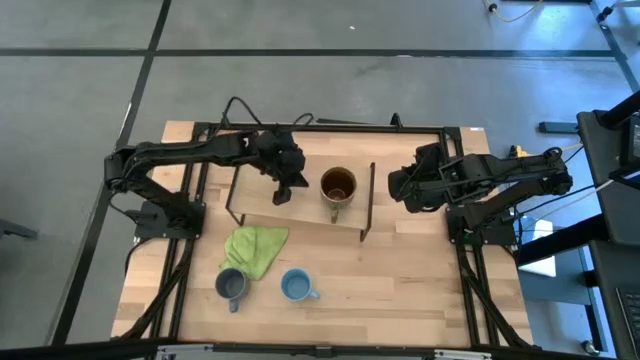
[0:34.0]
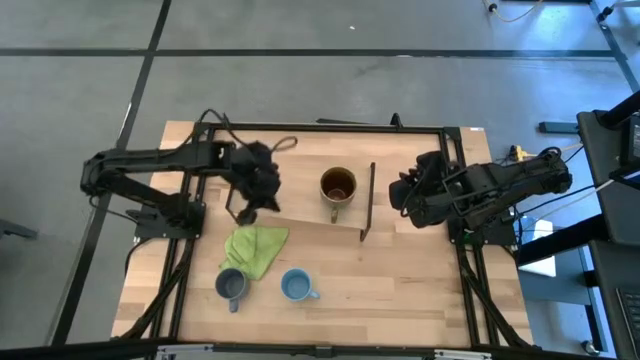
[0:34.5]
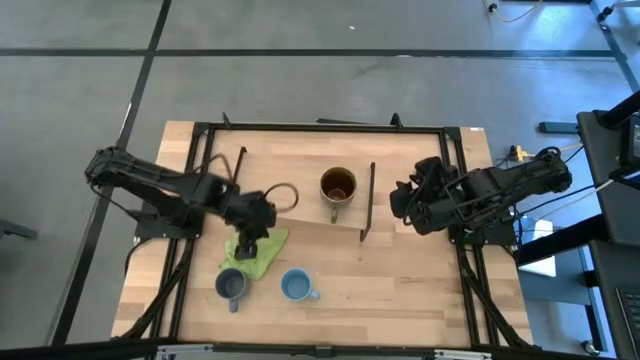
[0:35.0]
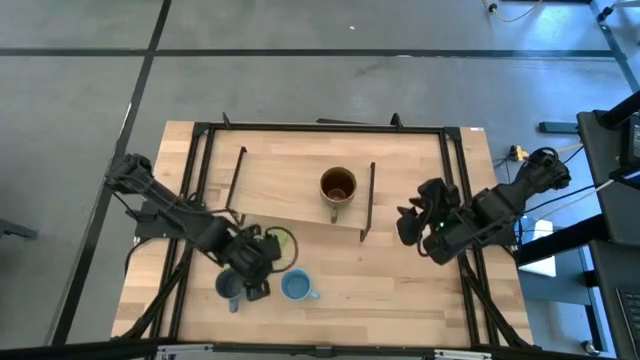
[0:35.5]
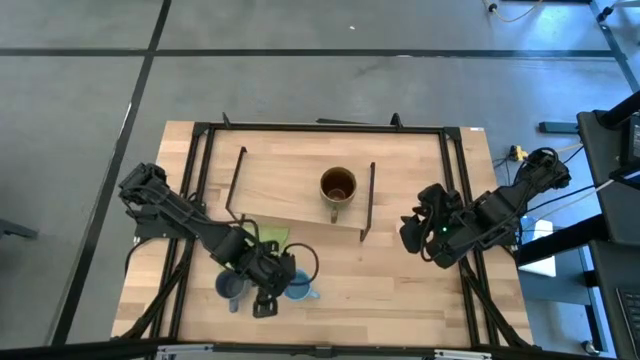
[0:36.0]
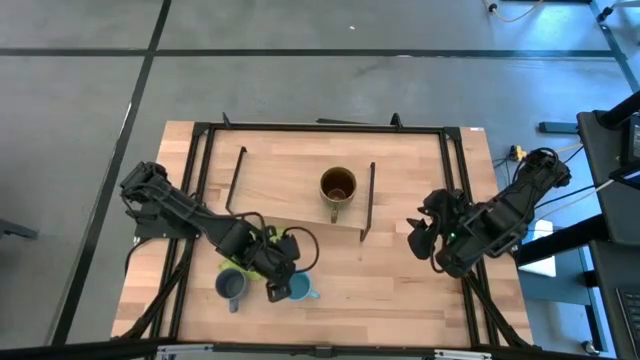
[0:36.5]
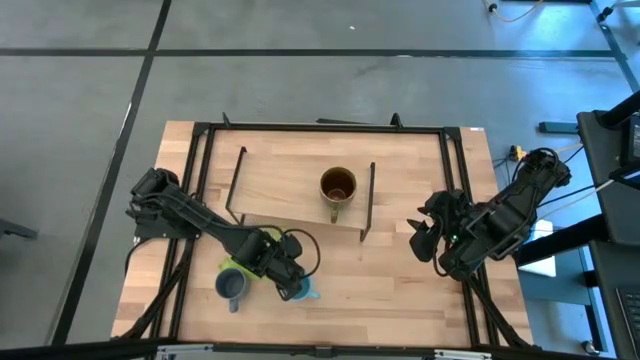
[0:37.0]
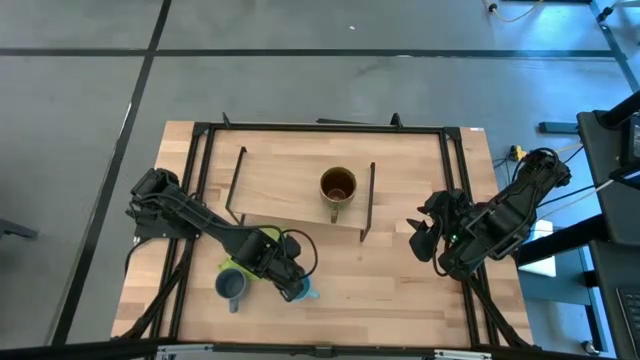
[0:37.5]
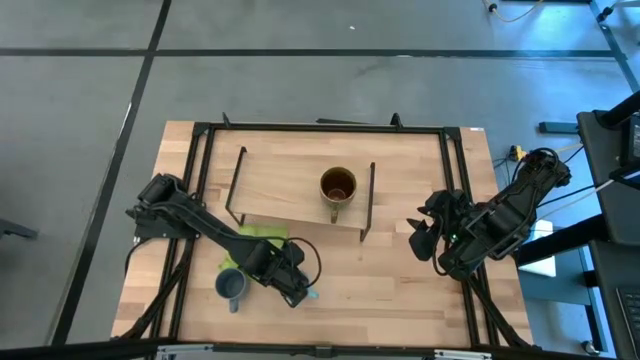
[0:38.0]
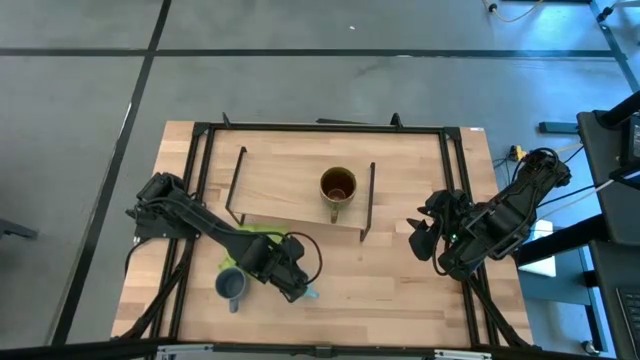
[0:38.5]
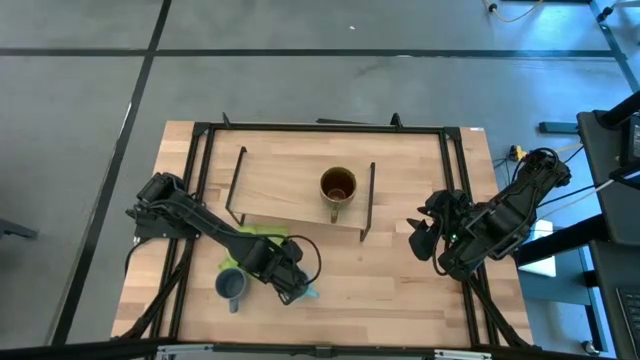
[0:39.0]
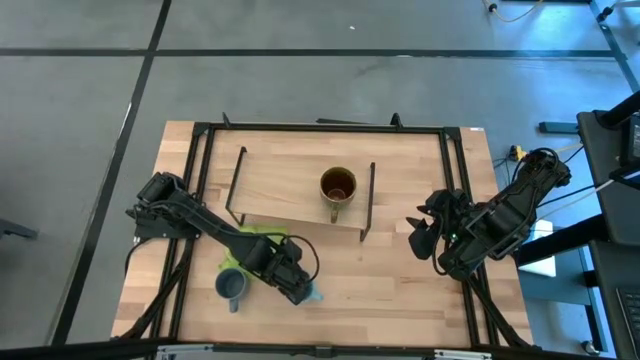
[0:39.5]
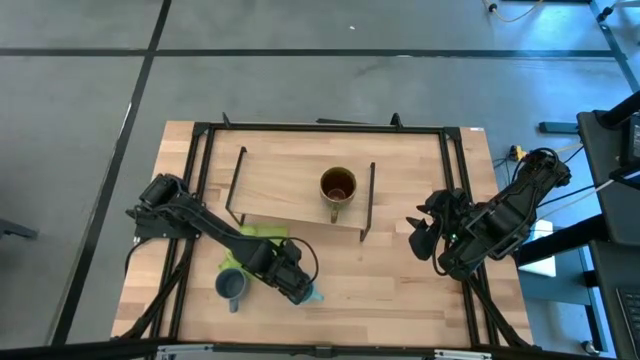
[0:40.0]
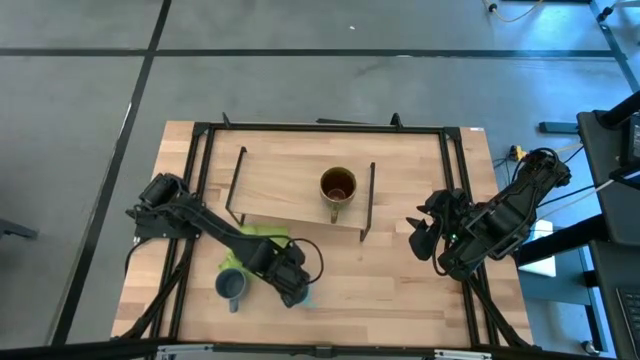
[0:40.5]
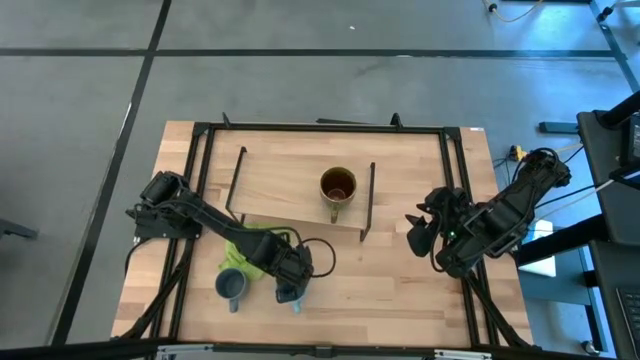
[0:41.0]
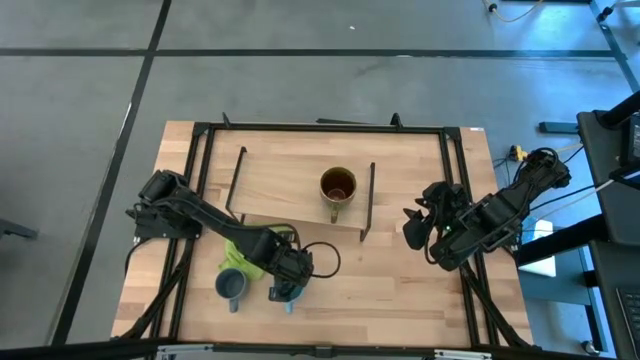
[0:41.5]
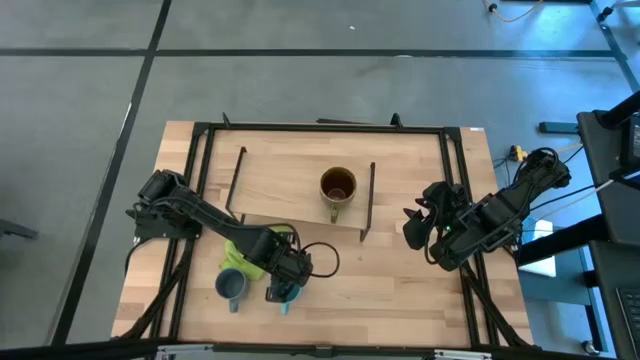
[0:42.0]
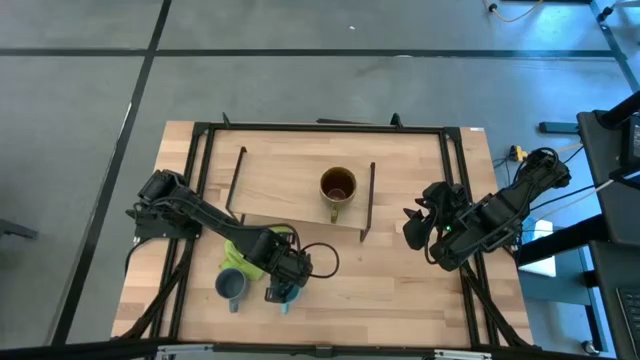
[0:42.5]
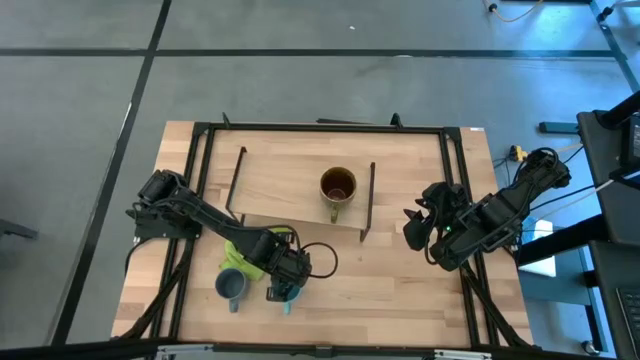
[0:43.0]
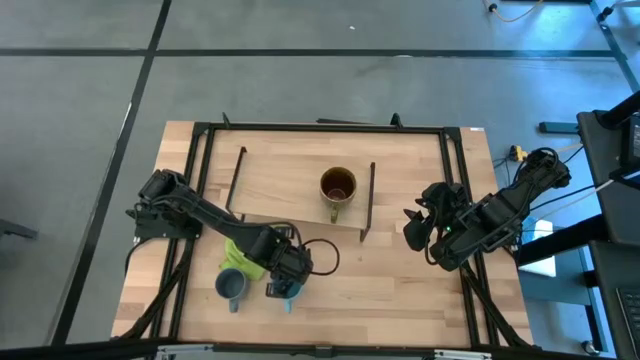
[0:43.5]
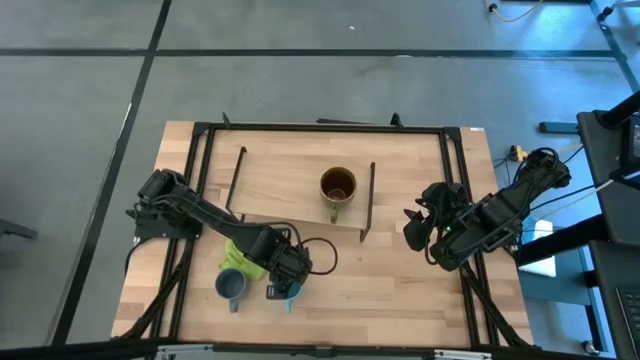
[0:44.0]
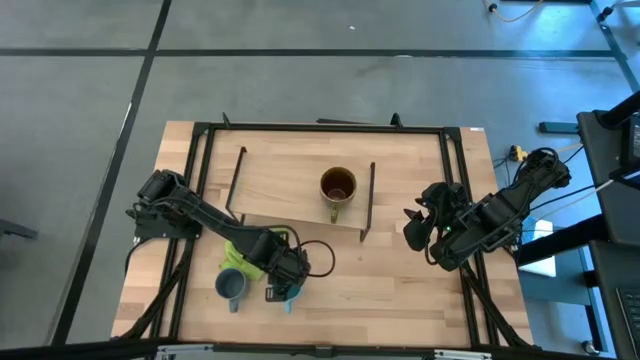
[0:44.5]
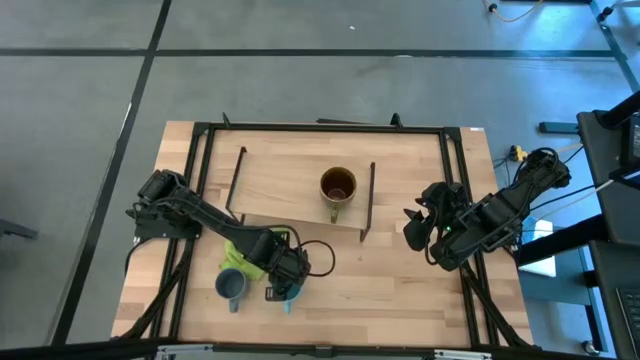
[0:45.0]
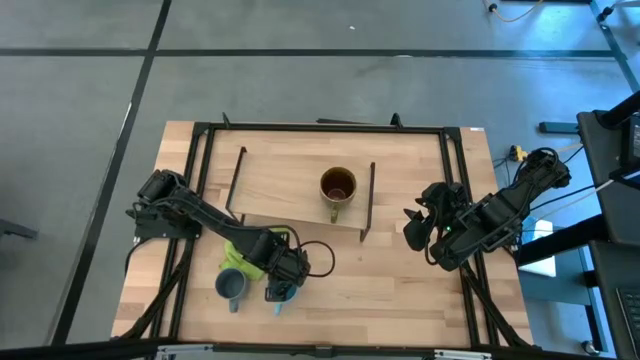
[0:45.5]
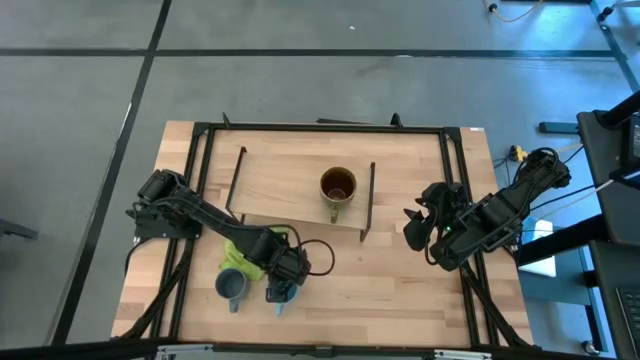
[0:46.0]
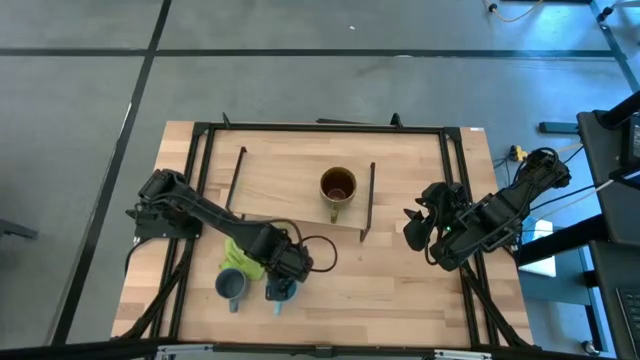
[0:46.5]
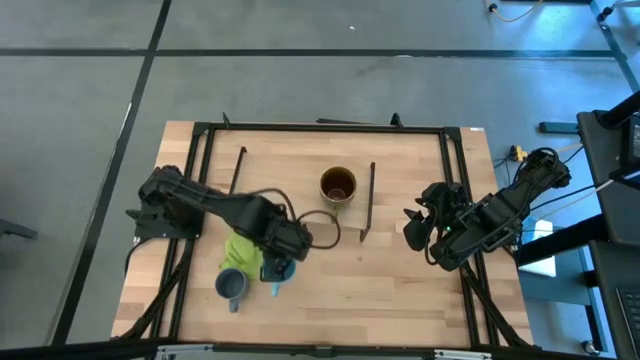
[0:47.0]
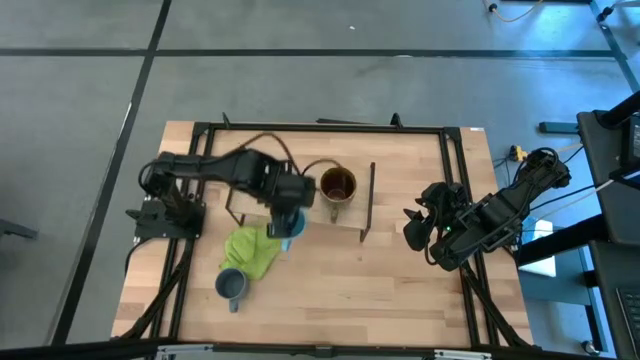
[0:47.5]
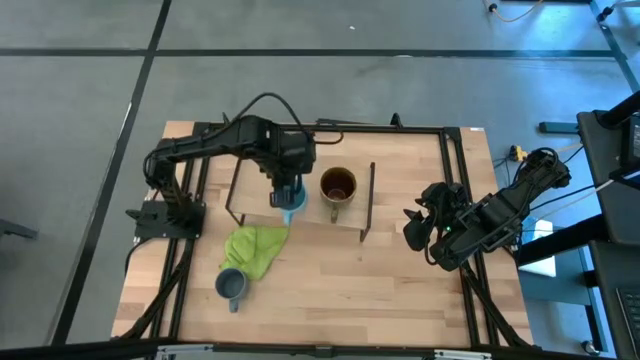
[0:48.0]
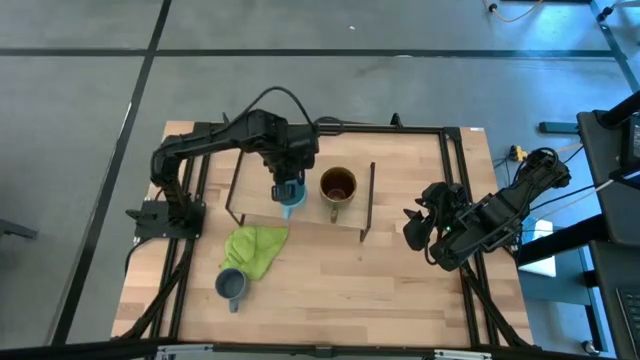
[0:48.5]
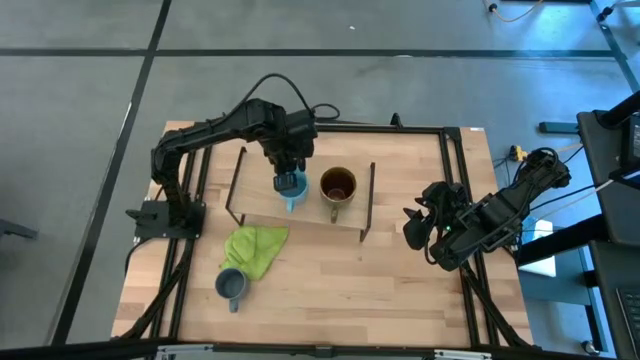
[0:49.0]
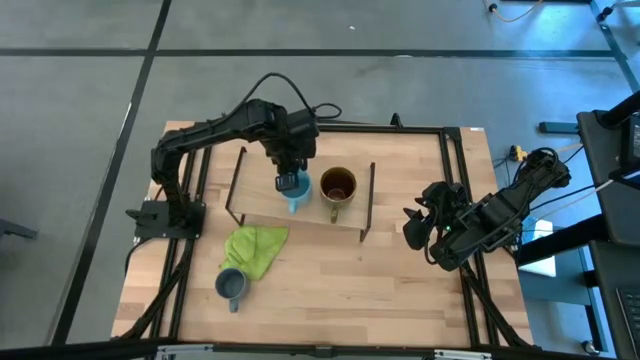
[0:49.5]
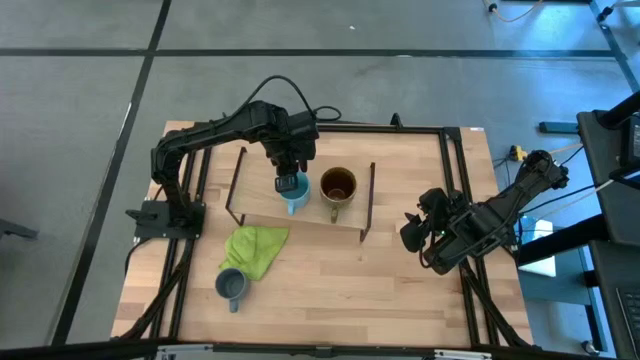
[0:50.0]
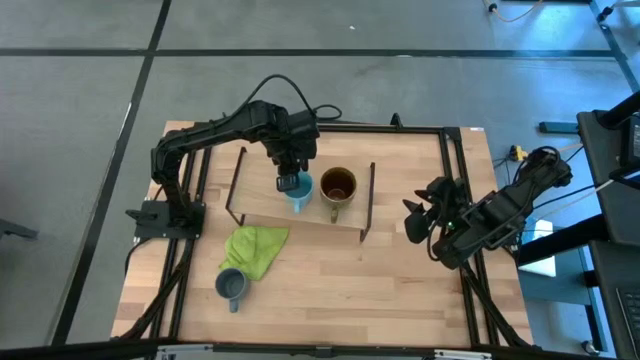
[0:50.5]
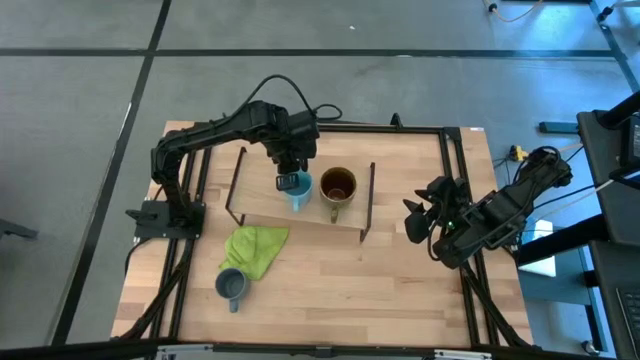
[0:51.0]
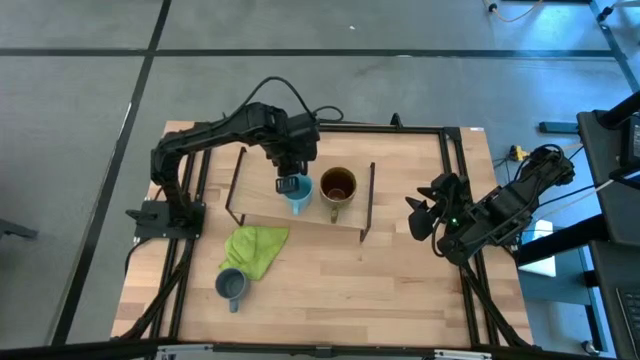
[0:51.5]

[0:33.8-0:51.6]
Task: Stack small to large cups/mugs on shelf
Put the blue mug on the shelf
